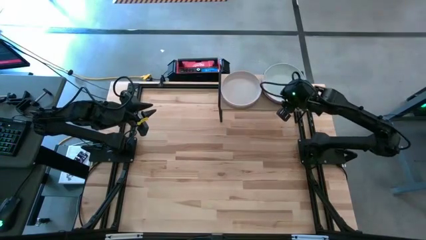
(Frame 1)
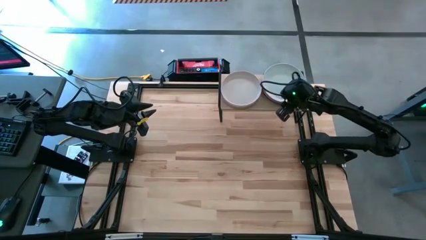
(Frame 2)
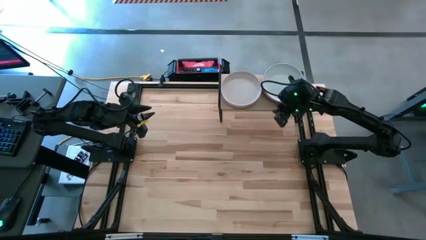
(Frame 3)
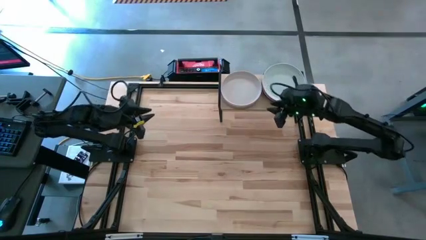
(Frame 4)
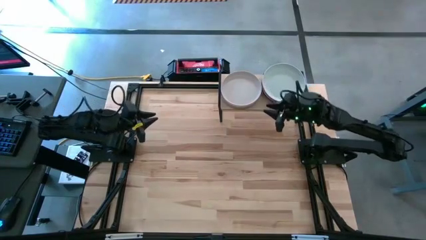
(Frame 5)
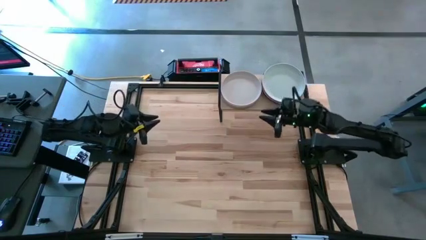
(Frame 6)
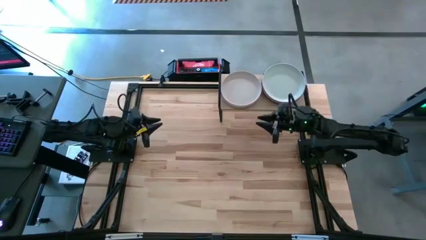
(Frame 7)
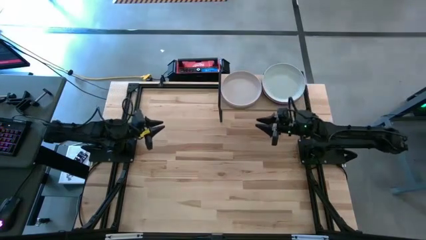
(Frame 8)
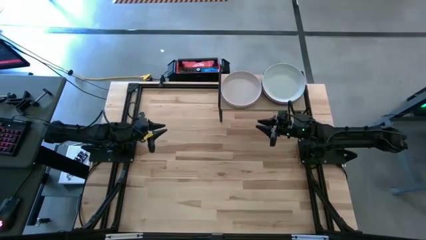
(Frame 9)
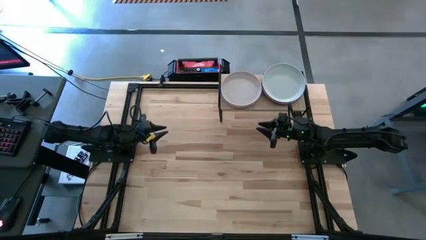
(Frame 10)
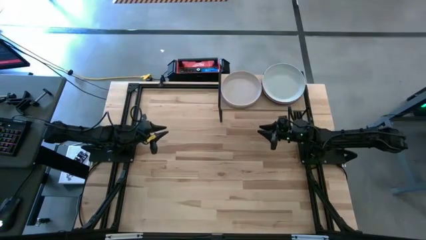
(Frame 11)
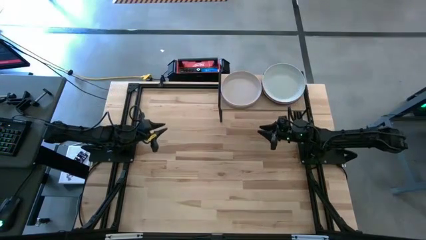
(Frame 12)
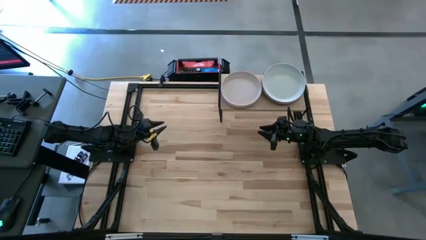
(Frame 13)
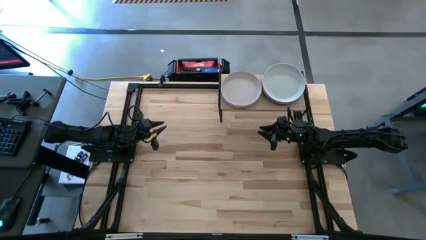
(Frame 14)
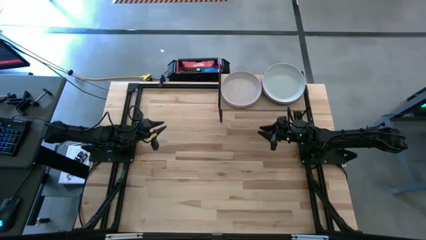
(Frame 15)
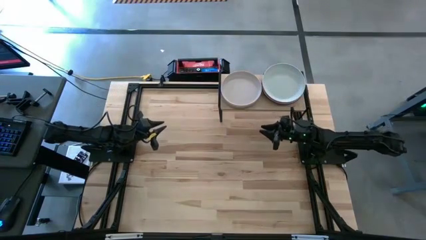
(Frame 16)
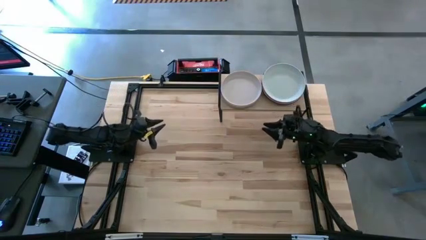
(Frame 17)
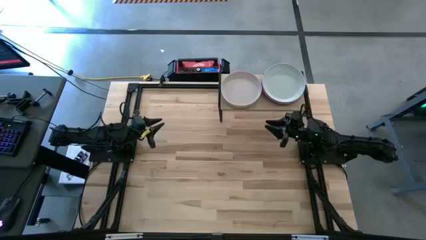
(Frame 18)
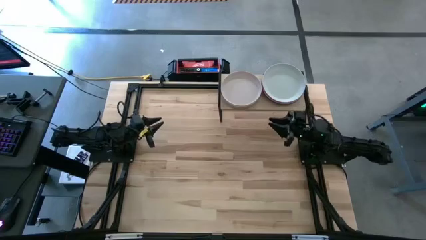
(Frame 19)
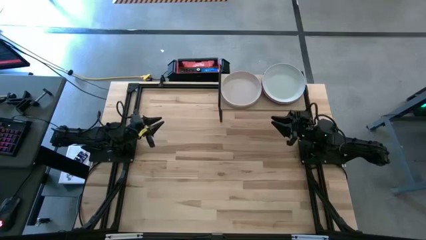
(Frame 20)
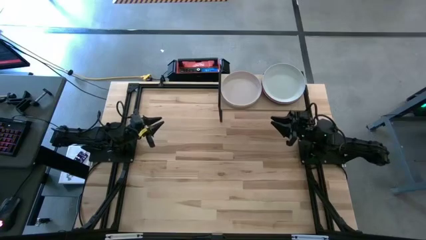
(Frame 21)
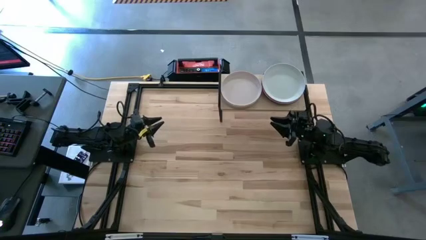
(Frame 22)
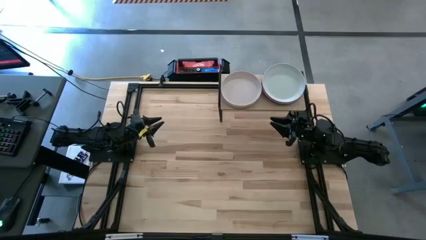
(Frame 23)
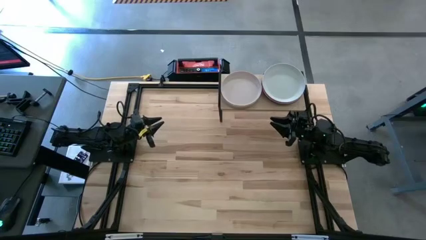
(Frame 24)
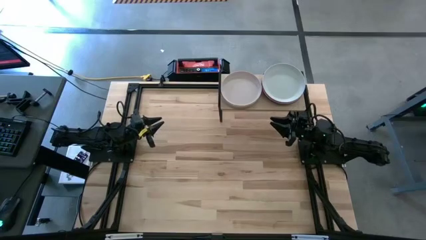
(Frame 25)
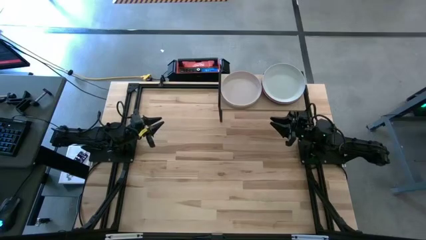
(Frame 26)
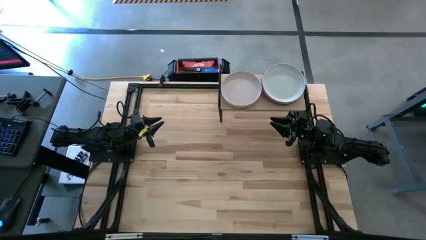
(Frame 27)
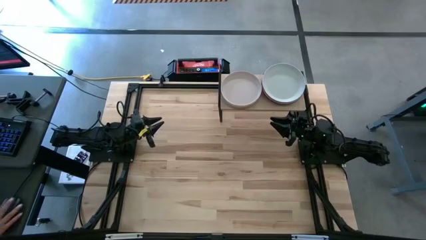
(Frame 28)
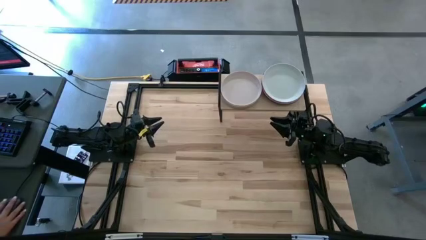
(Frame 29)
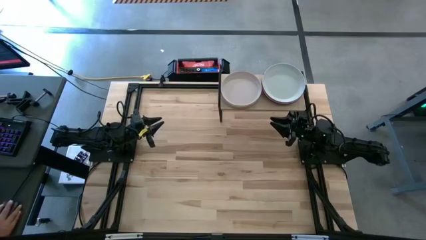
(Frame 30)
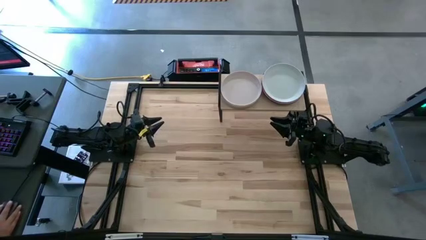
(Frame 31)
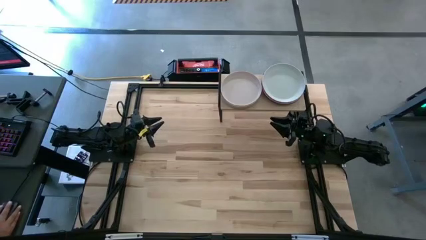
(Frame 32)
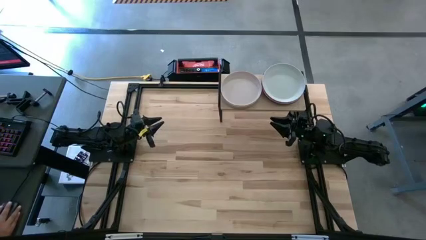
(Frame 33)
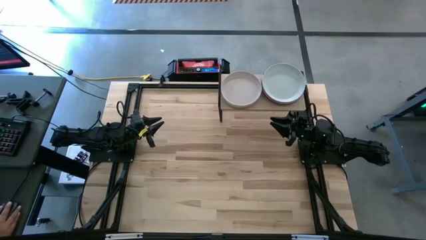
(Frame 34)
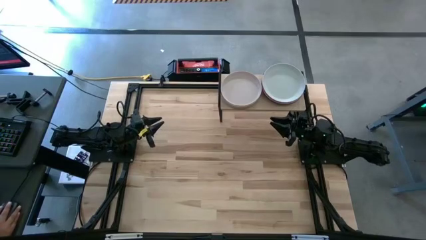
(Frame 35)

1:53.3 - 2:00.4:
Task: Place and stack plates onto a shelf
Return to Home Position

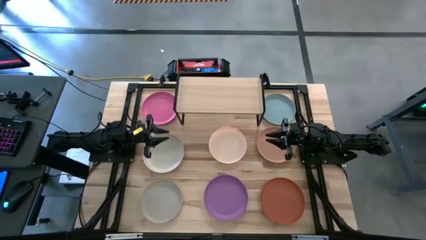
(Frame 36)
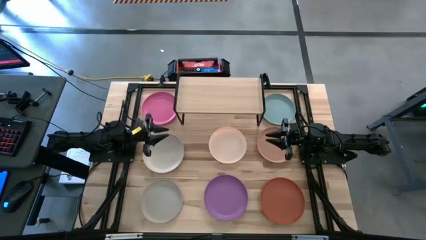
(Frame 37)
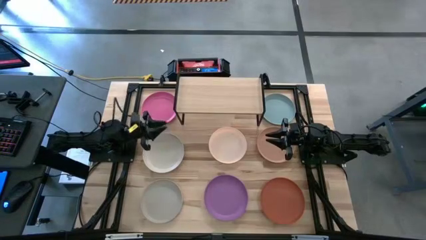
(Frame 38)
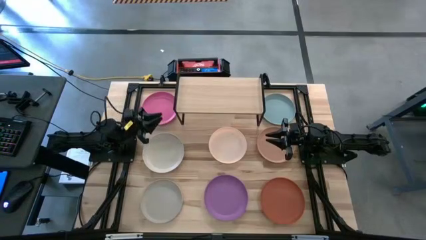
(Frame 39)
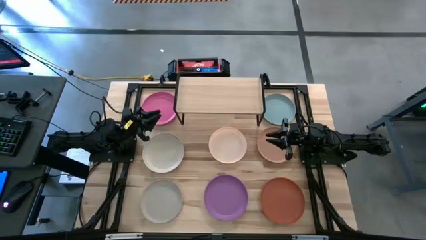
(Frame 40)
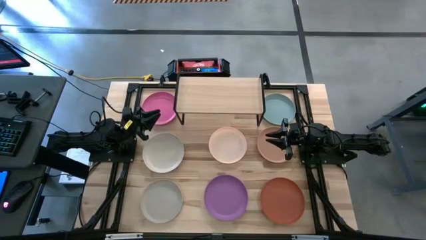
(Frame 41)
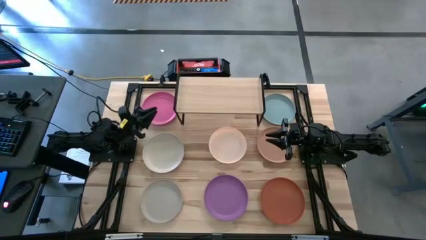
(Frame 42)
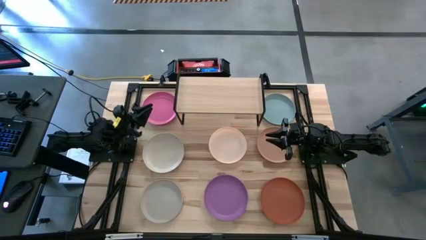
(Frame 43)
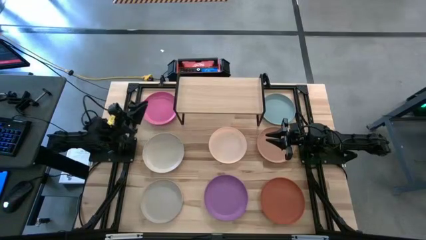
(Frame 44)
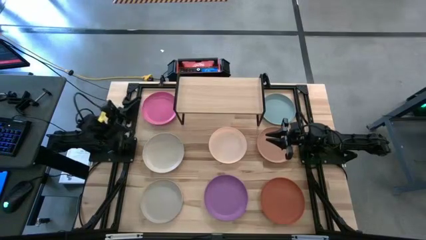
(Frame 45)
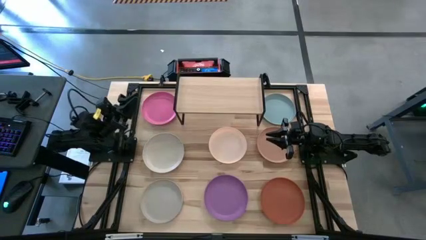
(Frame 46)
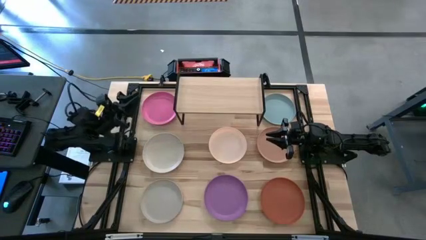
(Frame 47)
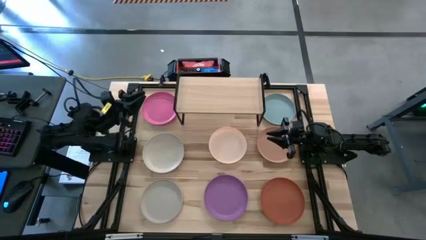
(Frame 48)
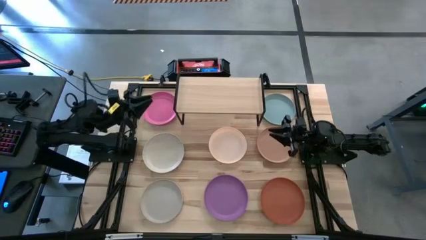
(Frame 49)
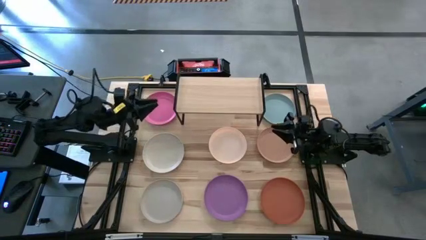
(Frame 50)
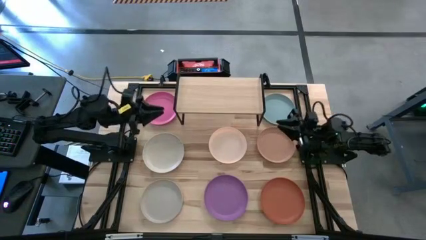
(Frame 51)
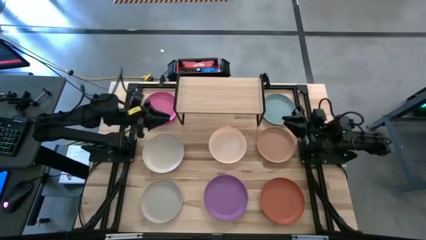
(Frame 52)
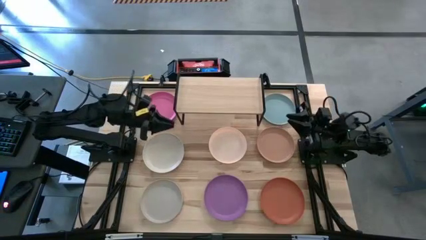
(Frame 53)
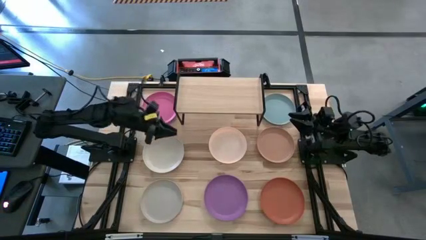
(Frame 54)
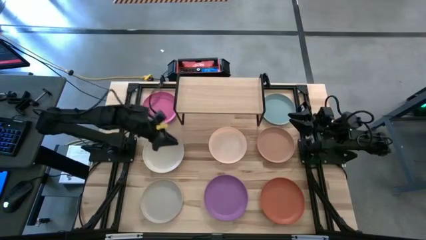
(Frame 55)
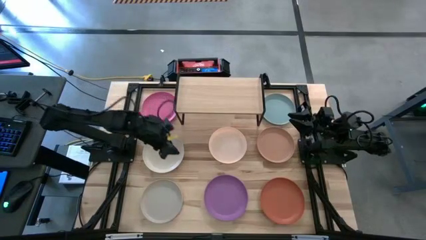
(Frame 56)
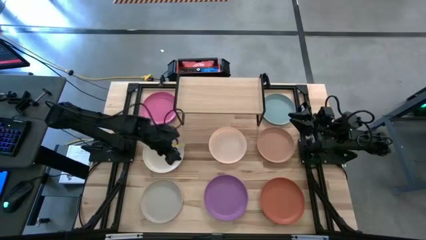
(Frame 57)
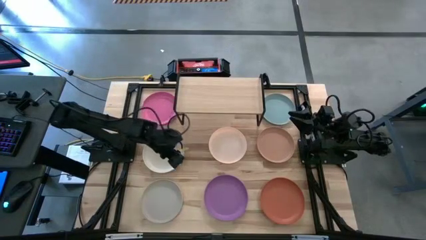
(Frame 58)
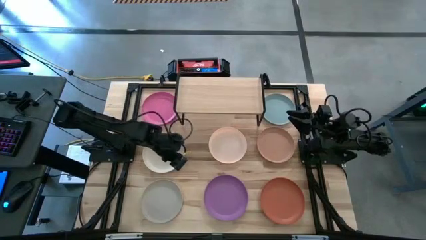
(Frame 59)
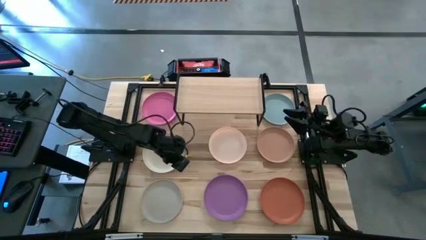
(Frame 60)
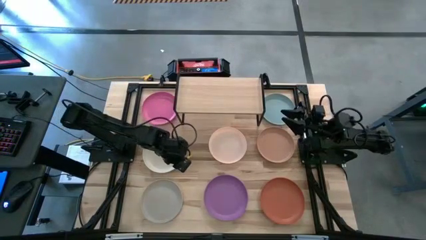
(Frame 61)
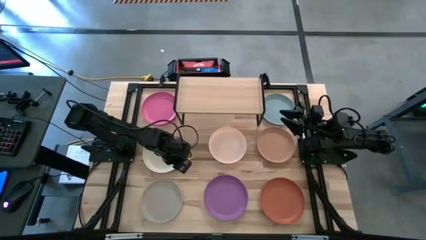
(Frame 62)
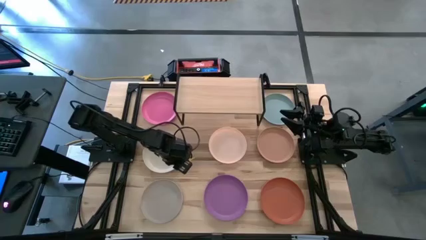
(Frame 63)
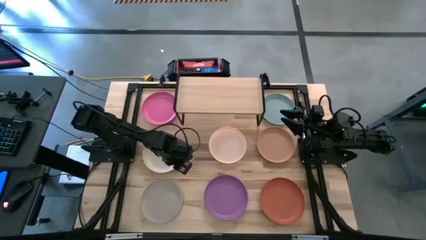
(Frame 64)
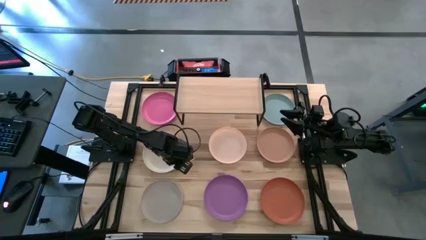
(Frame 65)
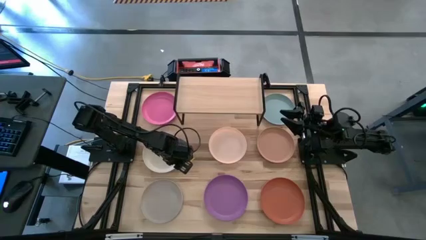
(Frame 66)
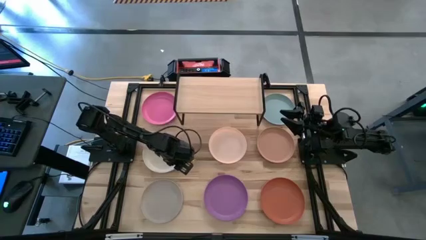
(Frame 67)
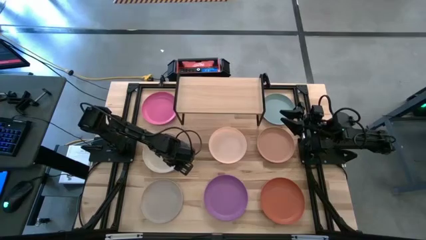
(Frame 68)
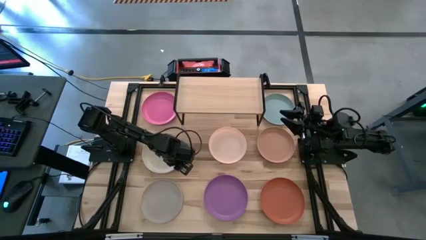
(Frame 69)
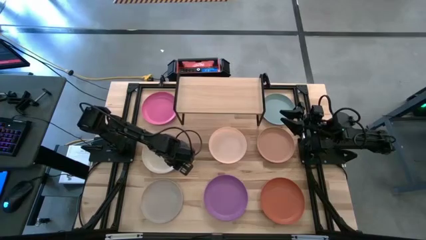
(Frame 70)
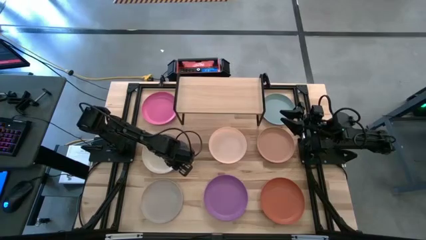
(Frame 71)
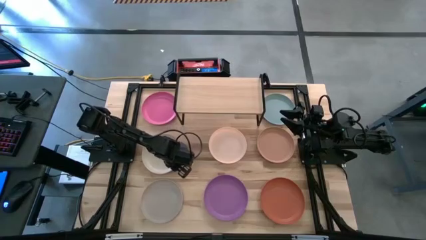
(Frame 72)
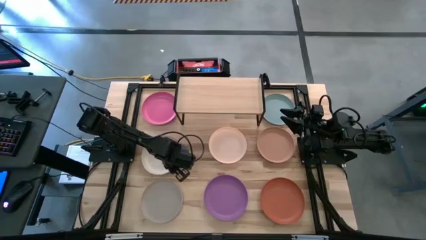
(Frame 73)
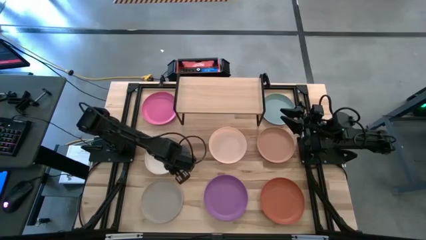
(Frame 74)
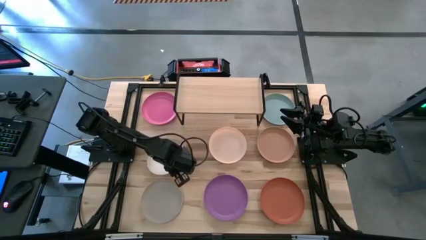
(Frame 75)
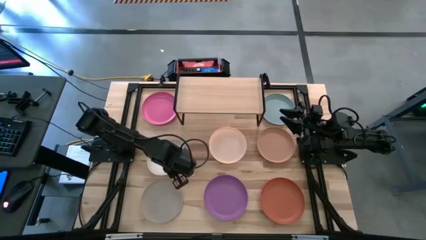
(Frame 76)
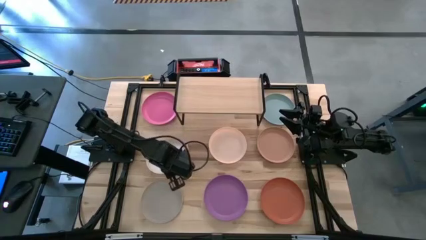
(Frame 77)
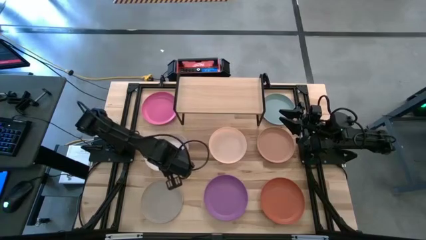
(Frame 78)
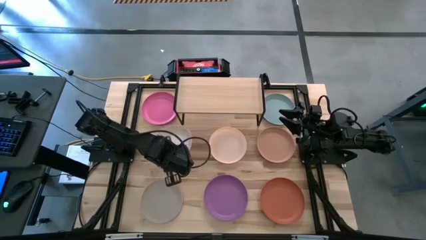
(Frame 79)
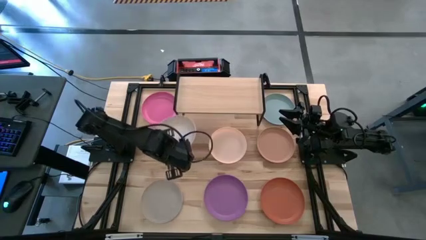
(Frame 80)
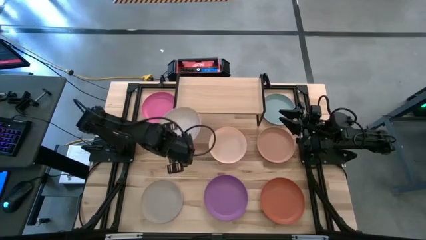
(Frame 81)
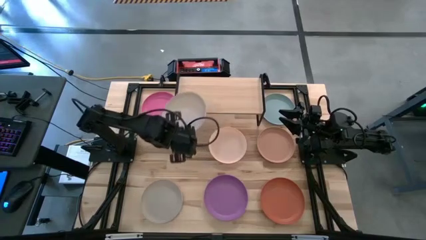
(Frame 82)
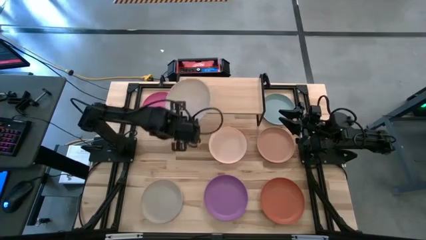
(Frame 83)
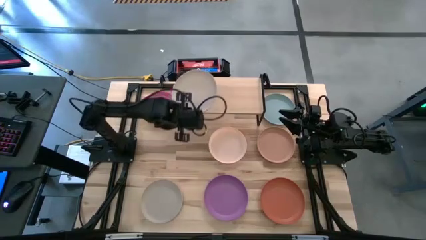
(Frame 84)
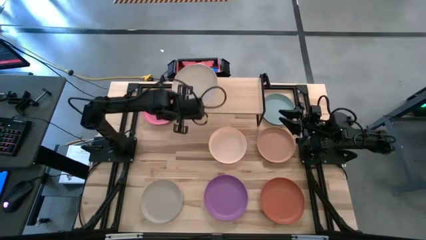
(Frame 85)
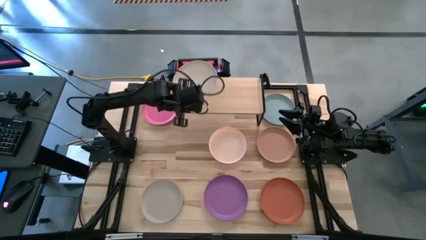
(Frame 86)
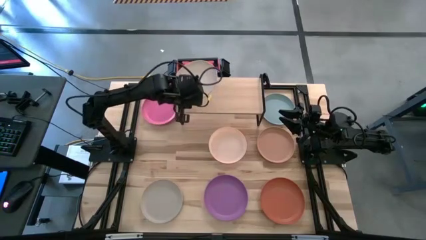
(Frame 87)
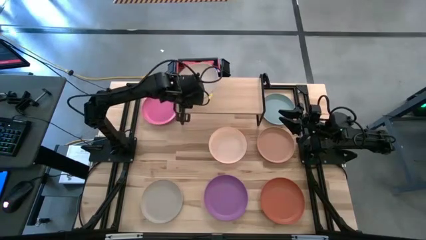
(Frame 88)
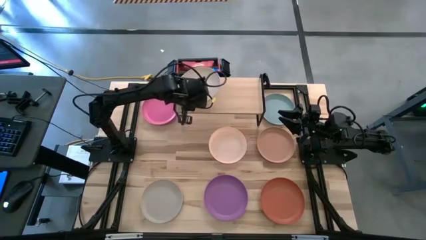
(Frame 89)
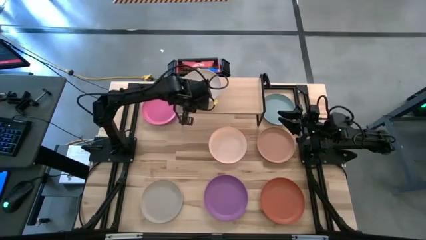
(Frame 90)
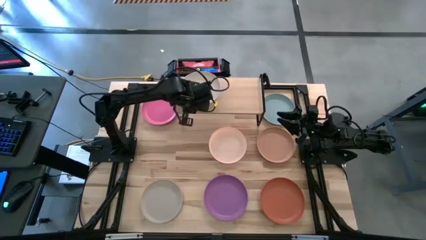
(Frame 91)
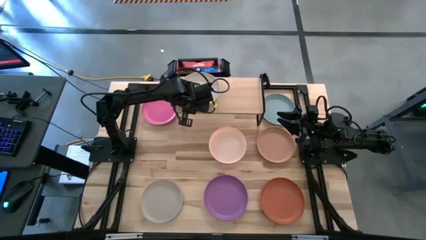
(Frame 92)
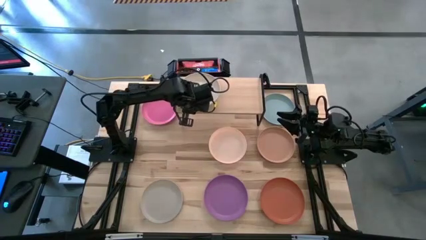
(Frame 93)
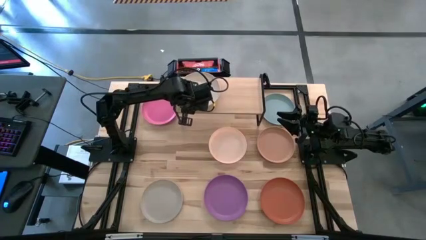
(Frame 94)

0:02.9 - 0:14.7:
Task: Place and stack plates onto a shelf
Put the white plate on the shelf
